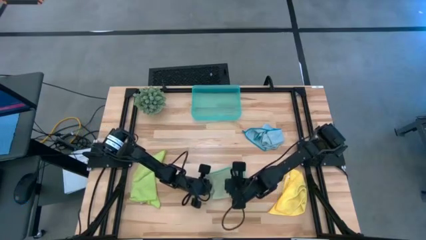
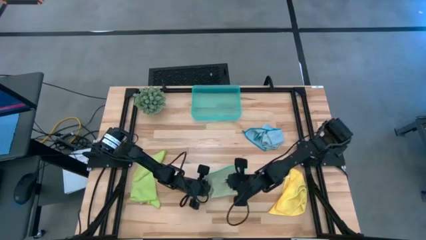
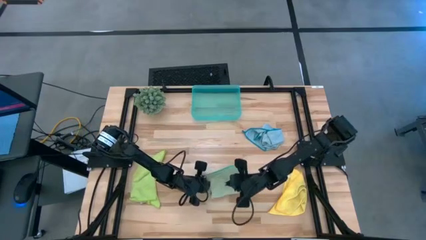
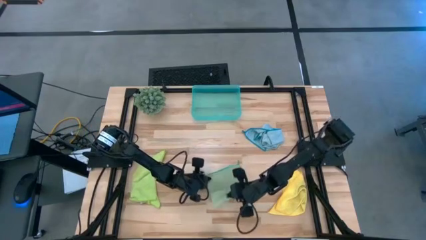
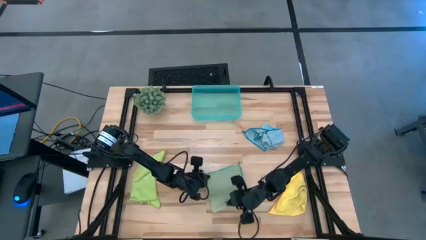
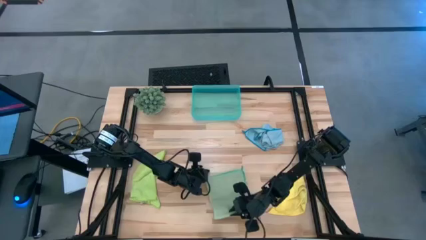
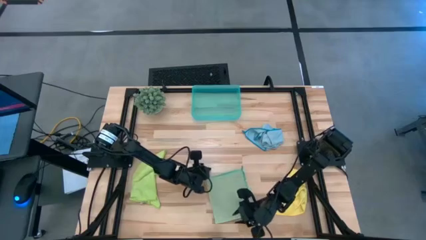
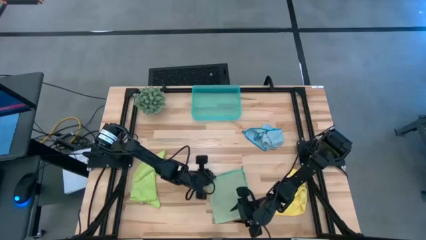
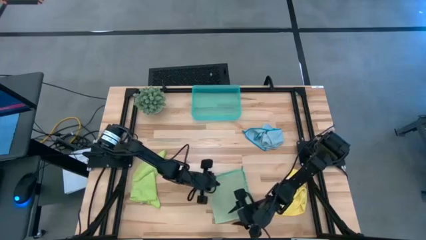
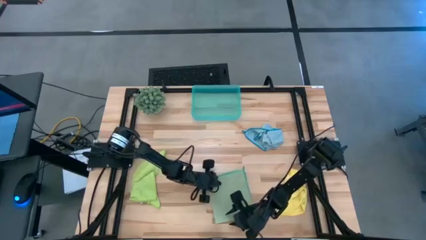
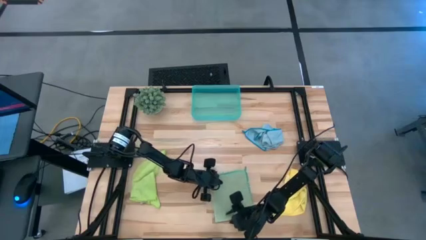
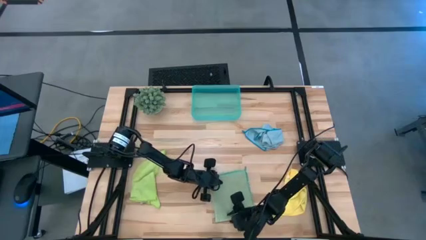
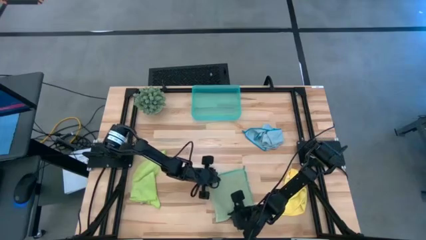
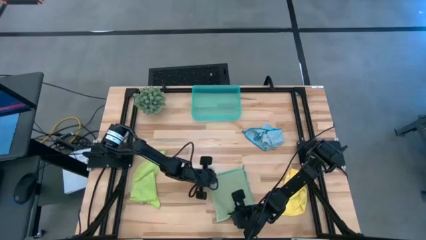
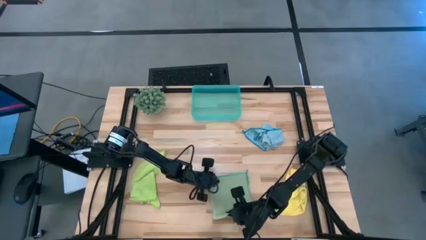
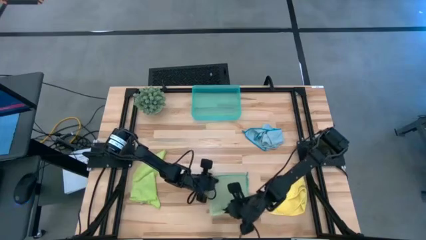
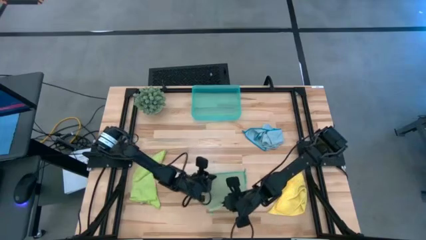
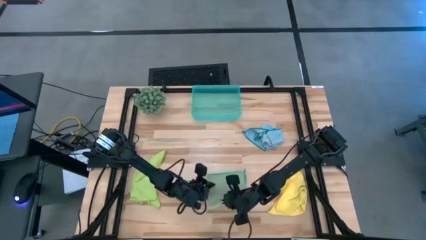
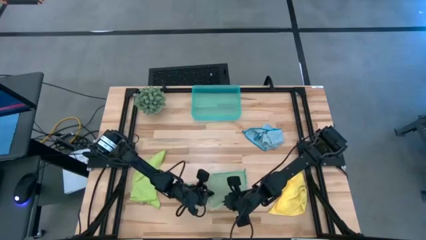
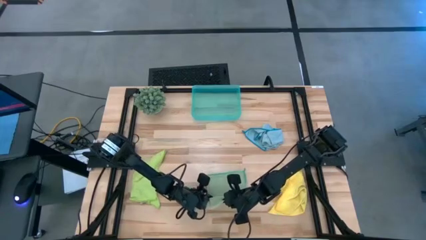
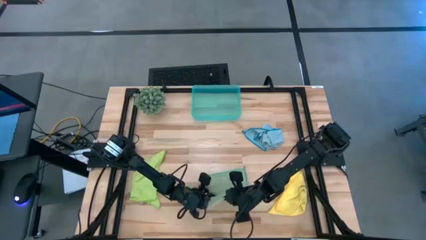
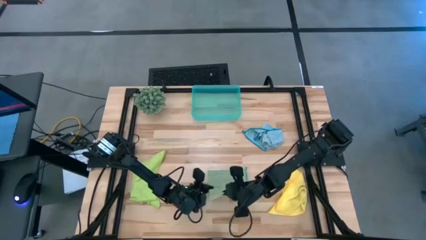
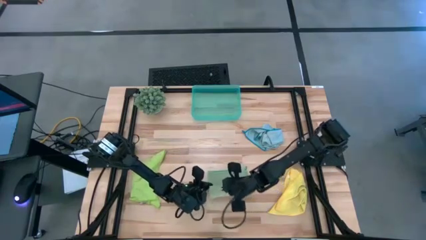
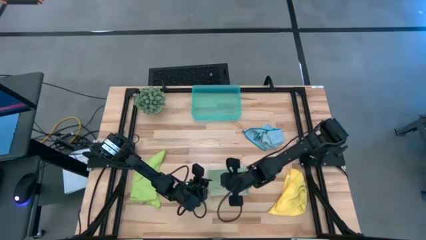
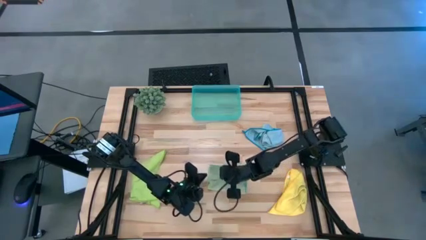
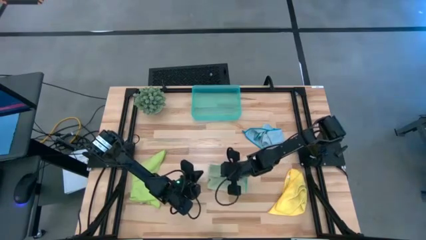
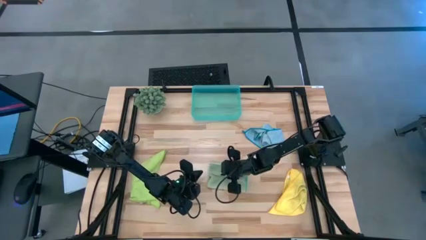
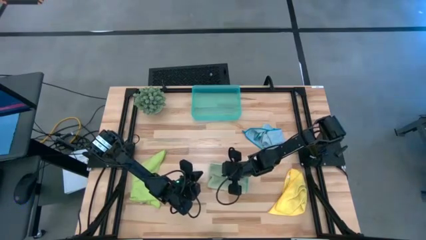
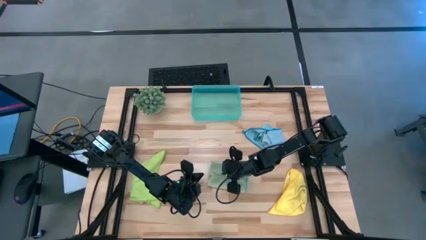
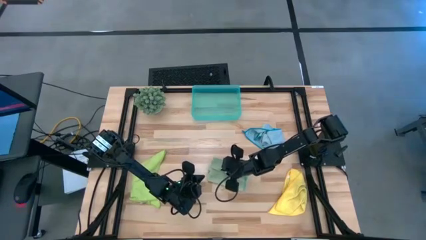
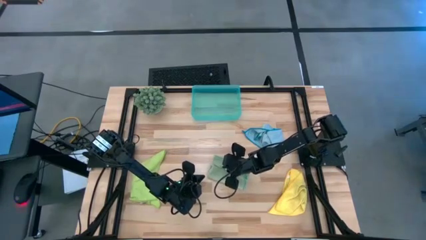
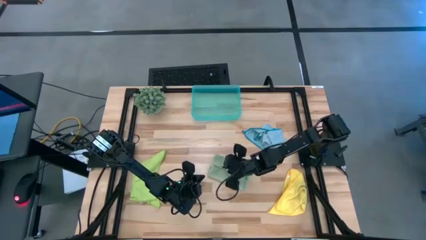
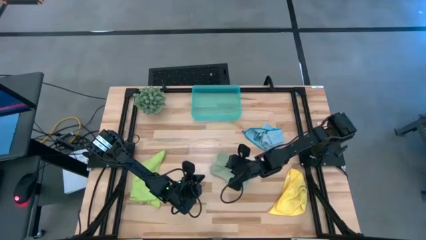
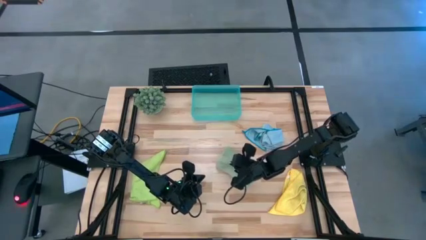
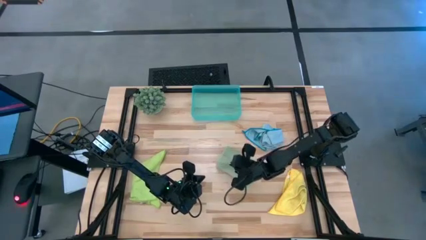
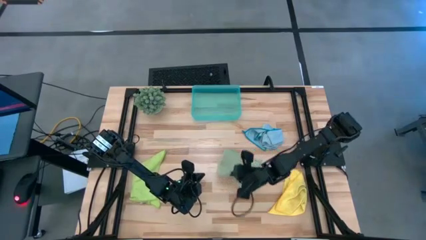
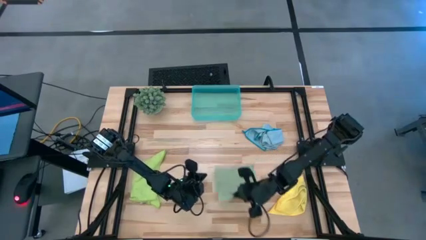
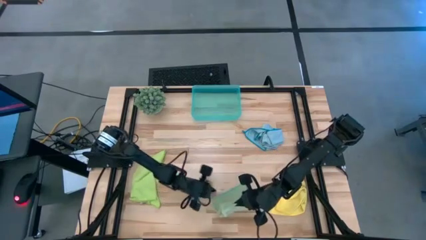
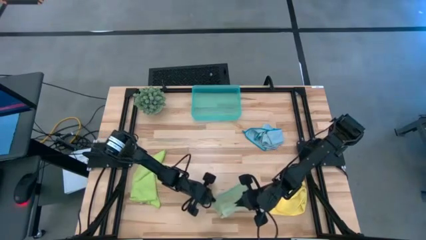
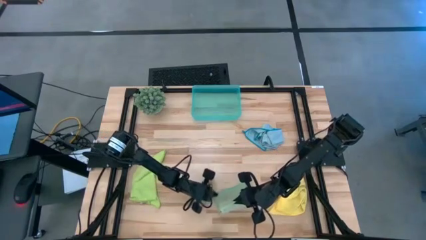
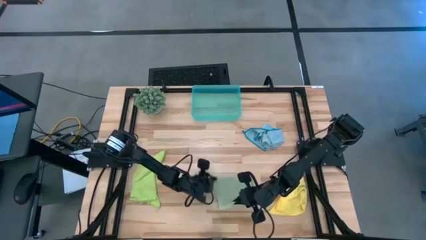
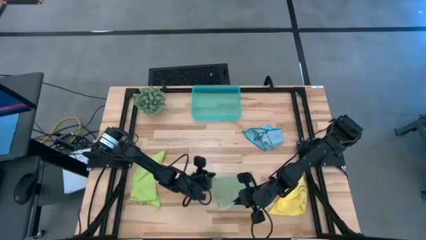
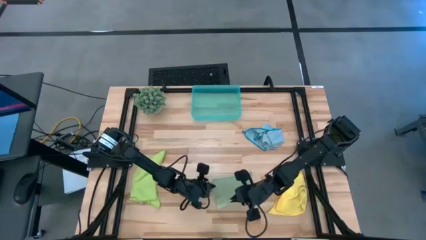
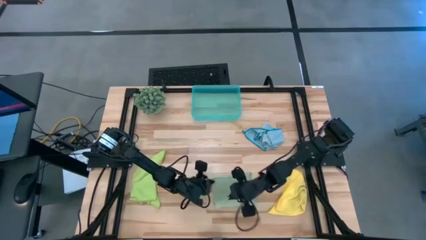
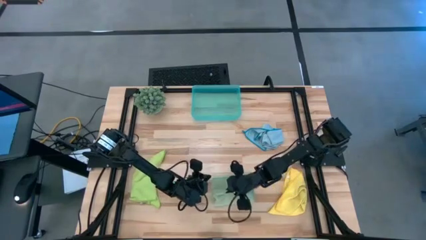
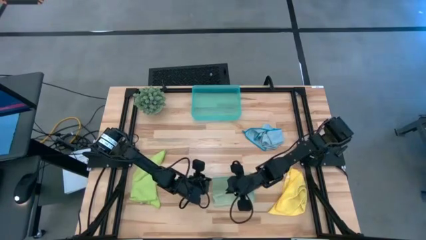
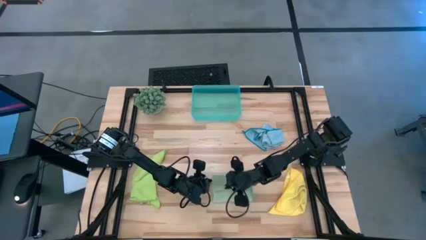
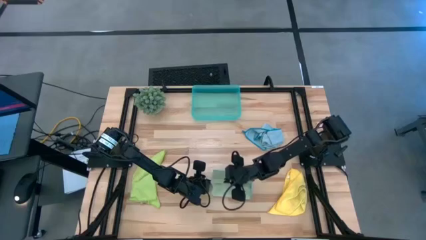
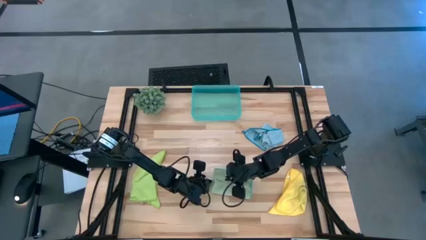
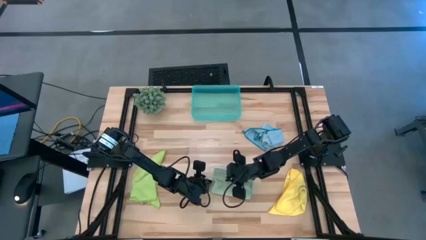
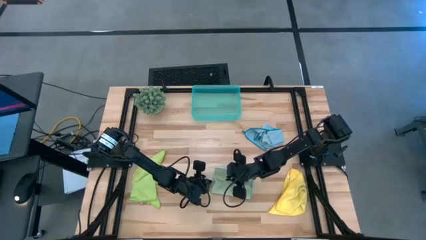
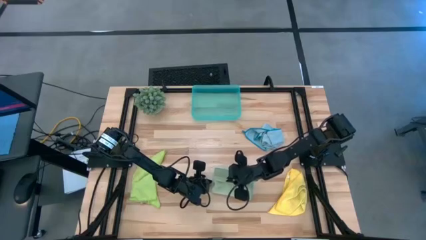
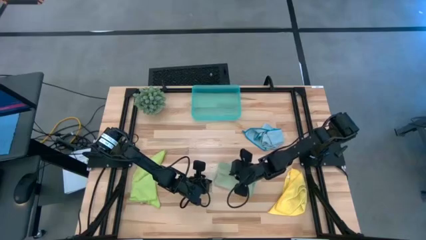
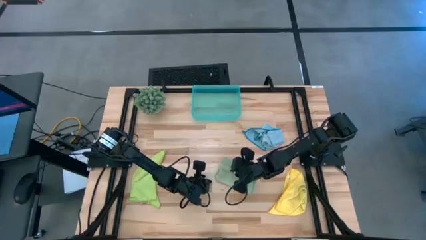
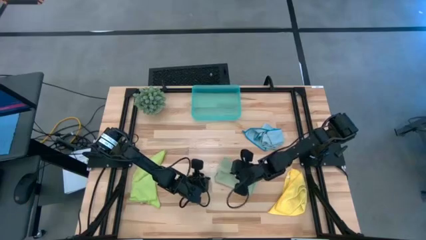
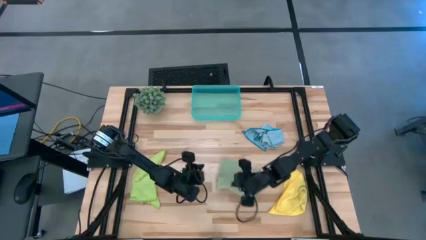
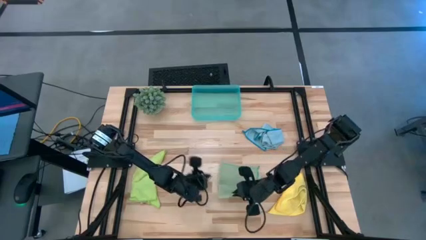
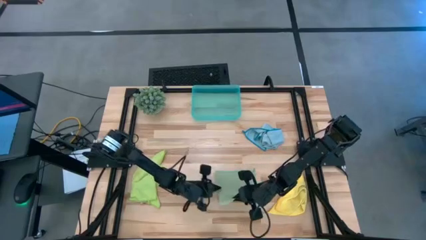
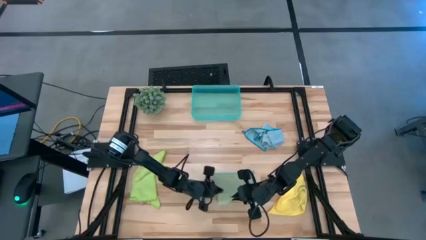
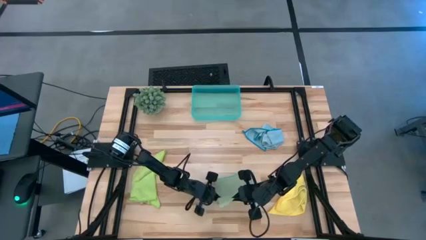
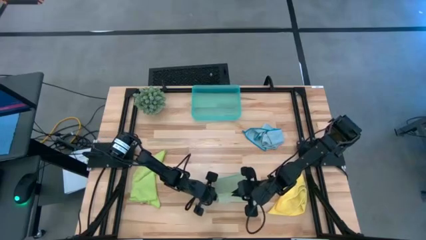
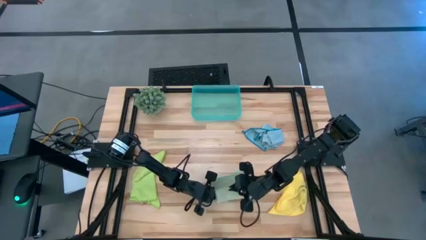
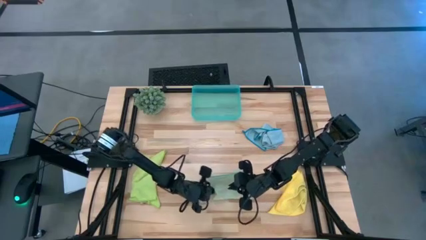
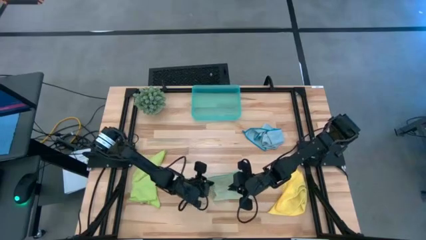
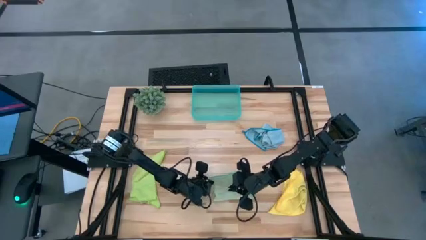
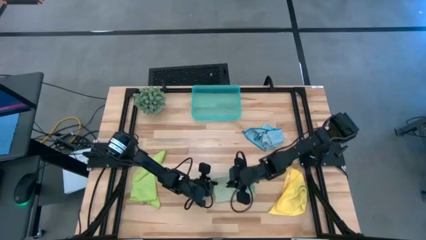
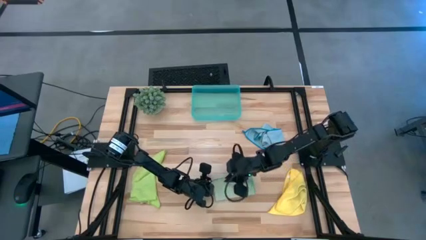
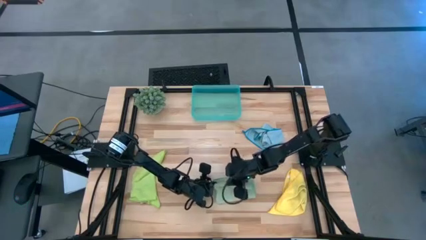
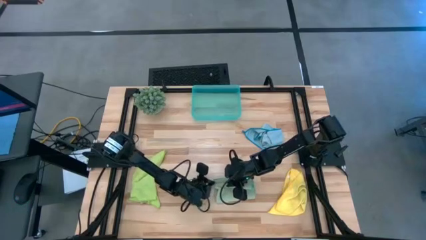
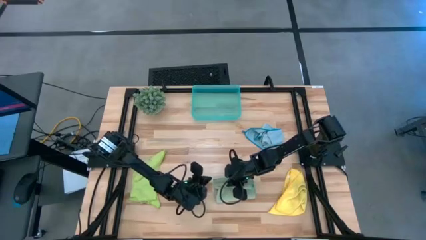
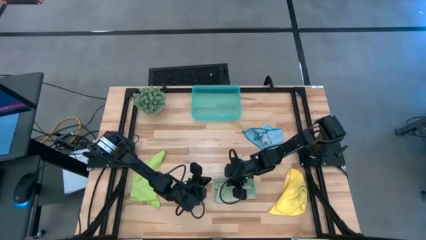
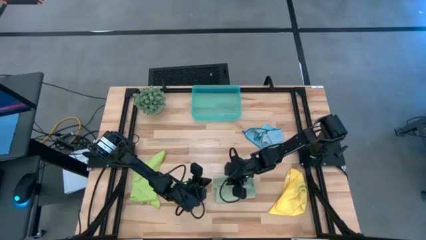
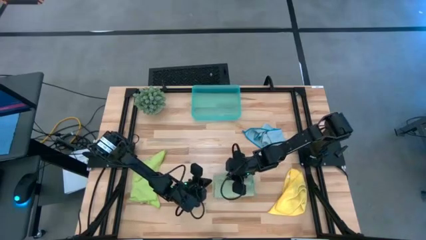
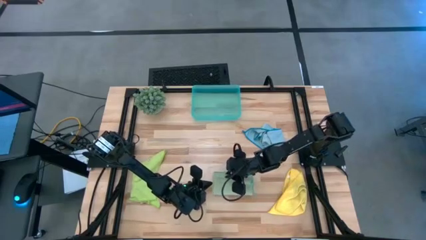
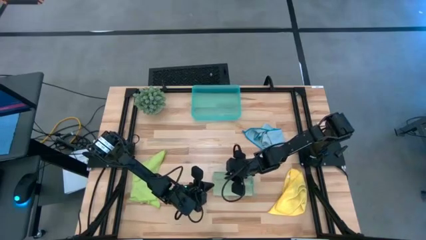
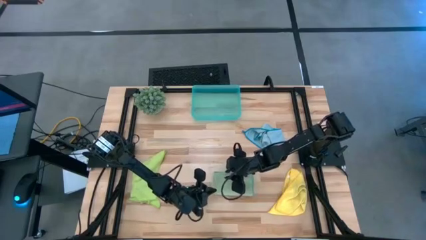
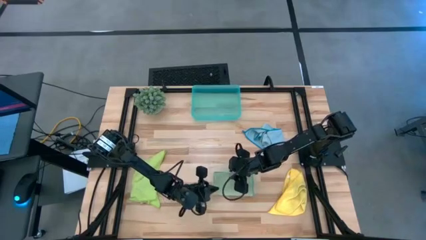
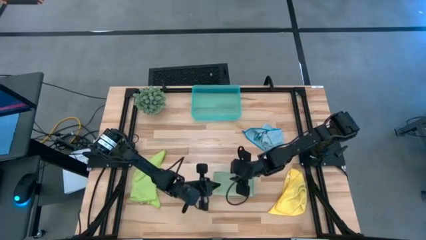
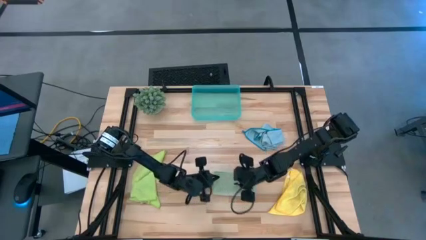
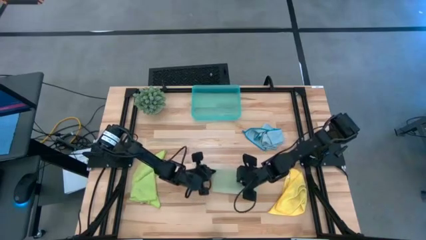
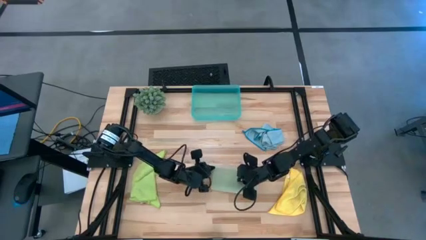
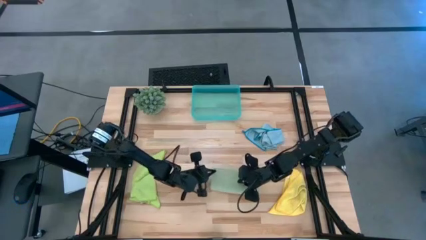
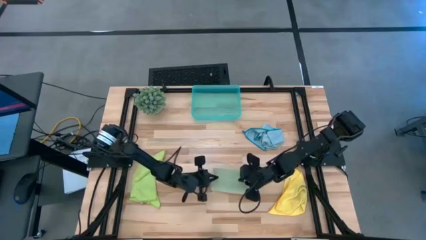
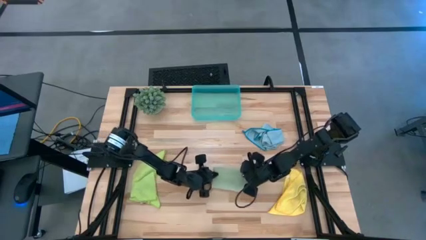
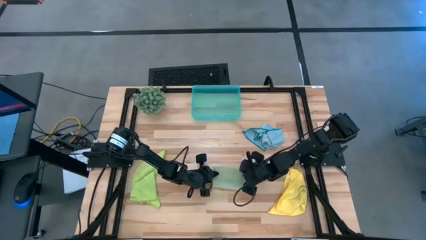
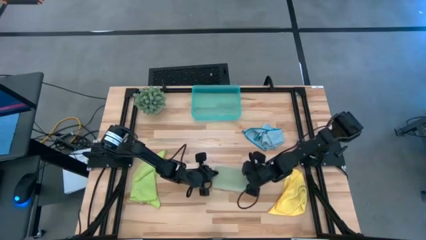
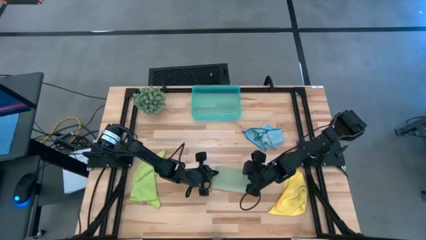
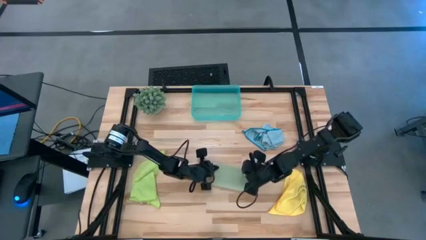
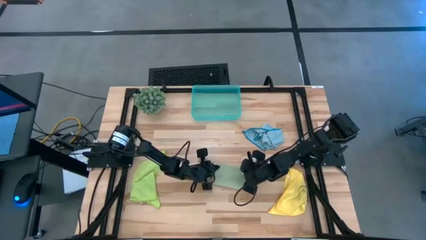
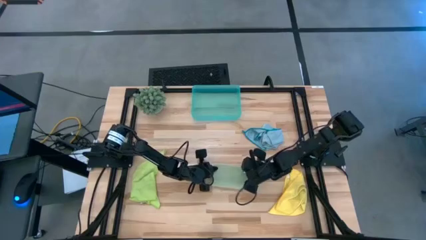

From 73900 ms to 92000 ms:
Task: Fold microfiber towels
Fold the green towel
